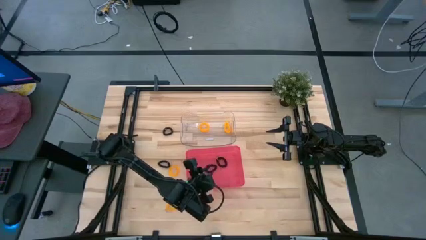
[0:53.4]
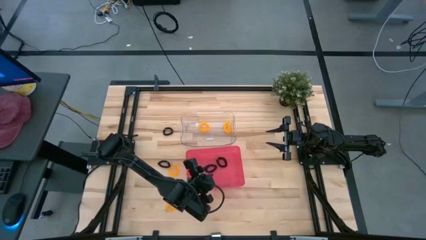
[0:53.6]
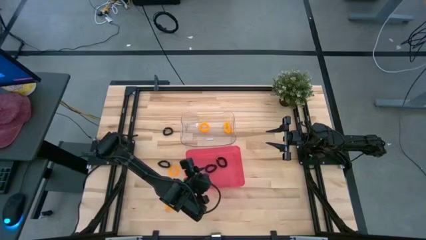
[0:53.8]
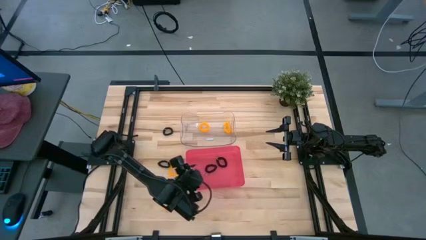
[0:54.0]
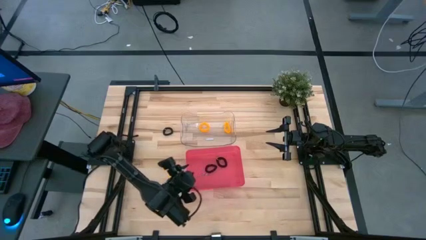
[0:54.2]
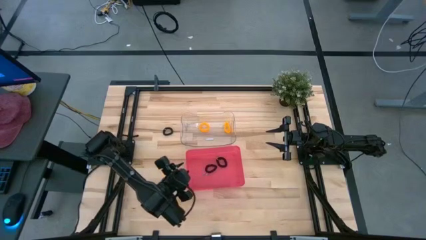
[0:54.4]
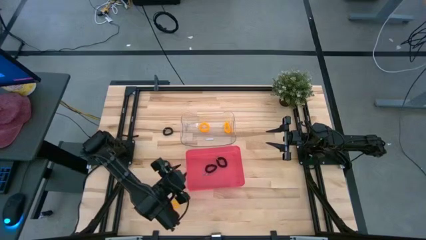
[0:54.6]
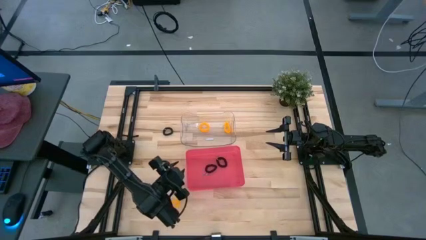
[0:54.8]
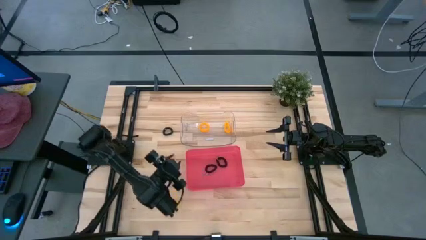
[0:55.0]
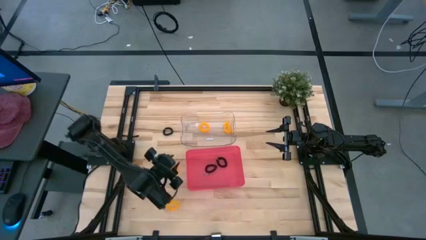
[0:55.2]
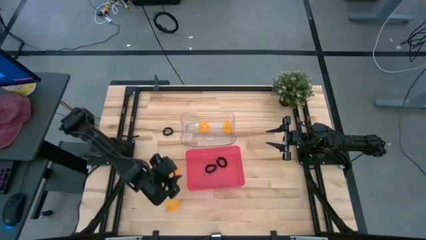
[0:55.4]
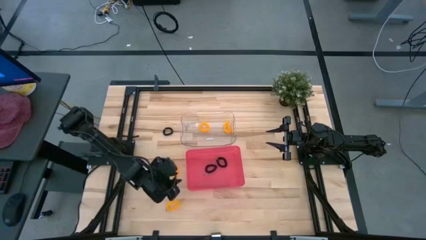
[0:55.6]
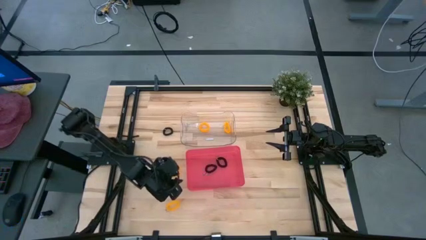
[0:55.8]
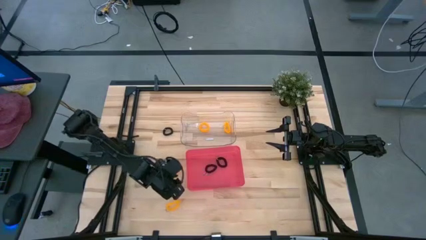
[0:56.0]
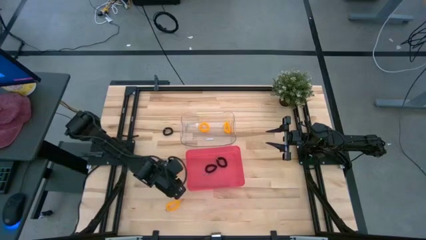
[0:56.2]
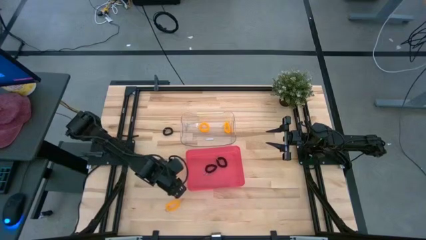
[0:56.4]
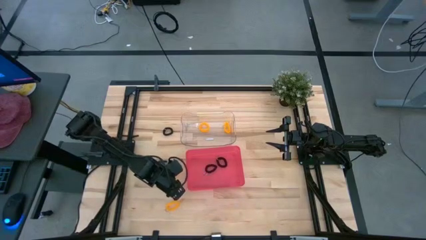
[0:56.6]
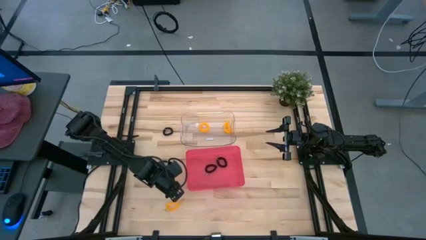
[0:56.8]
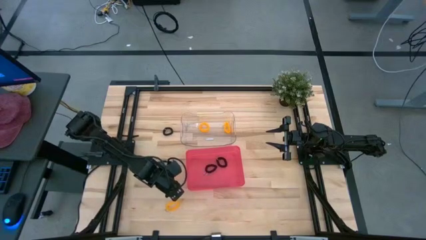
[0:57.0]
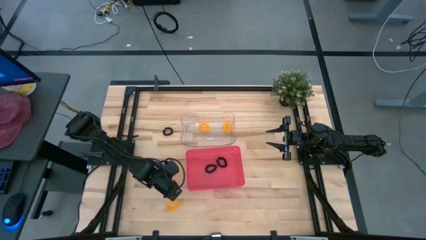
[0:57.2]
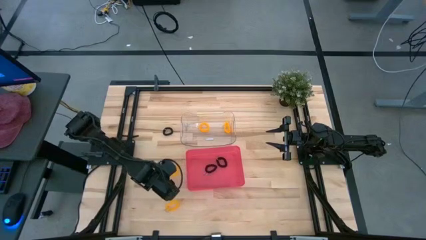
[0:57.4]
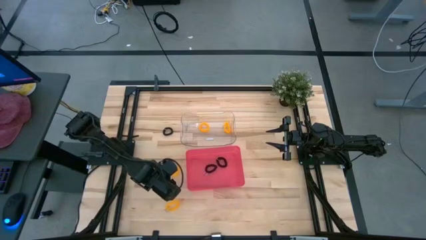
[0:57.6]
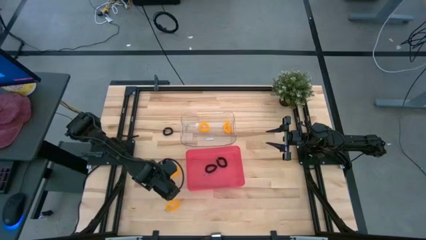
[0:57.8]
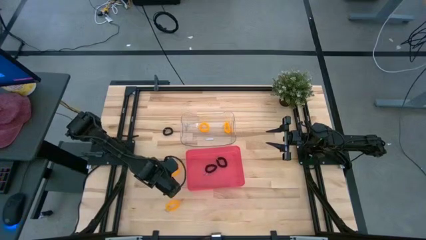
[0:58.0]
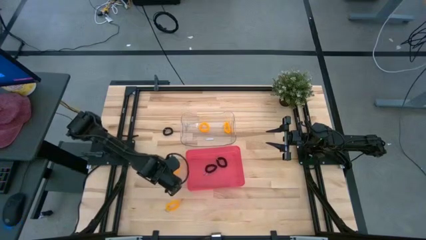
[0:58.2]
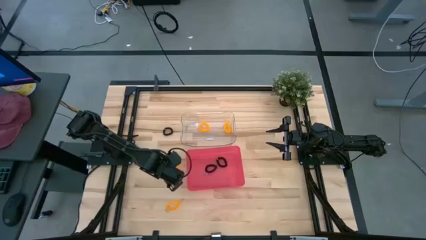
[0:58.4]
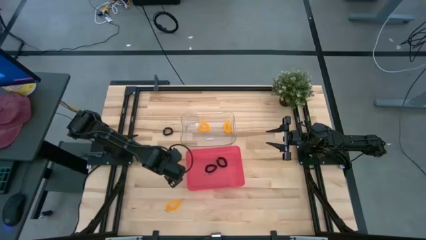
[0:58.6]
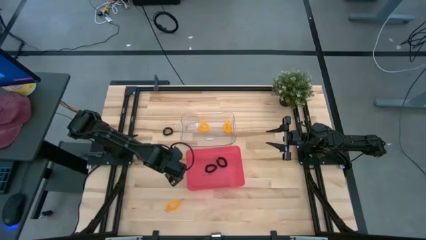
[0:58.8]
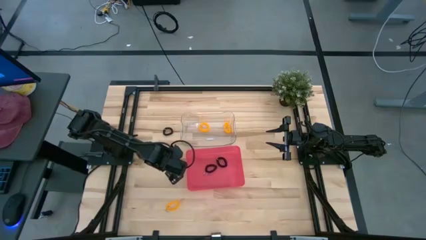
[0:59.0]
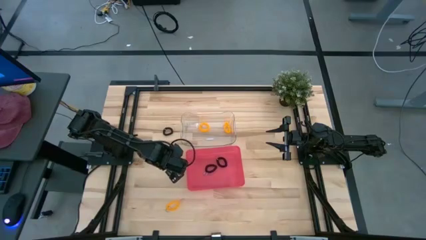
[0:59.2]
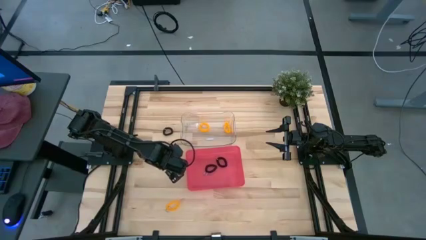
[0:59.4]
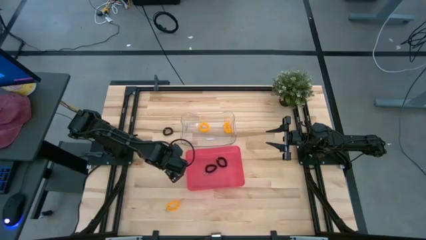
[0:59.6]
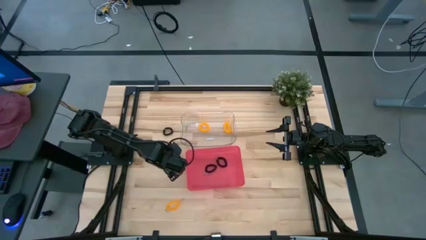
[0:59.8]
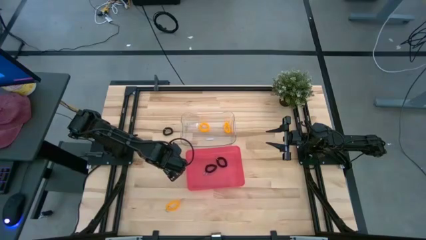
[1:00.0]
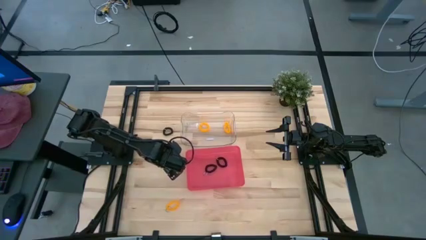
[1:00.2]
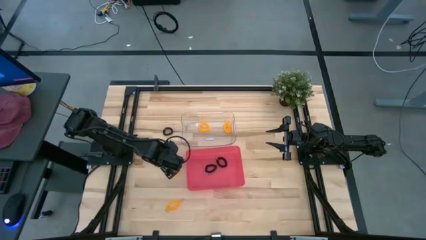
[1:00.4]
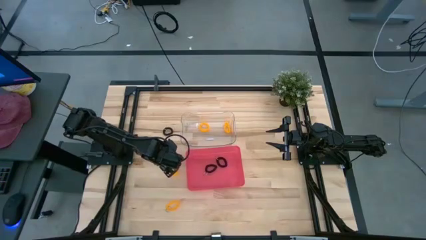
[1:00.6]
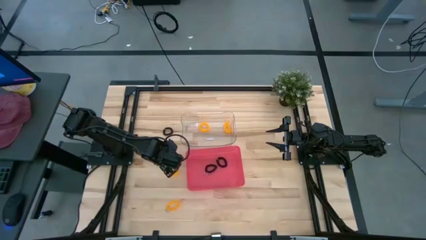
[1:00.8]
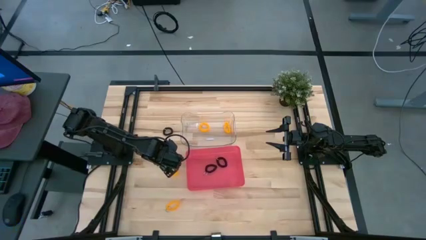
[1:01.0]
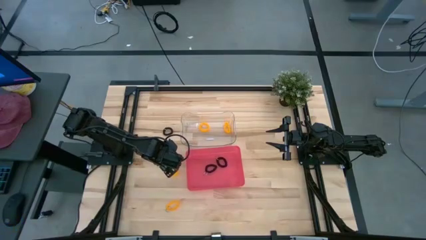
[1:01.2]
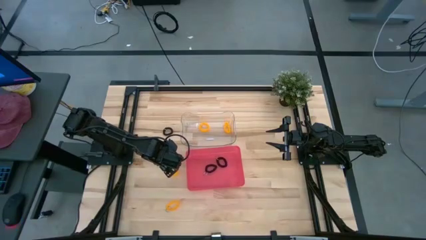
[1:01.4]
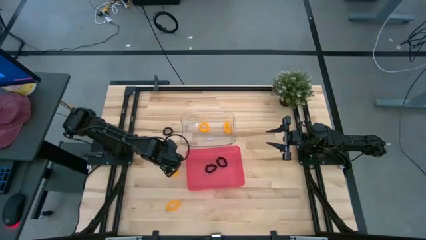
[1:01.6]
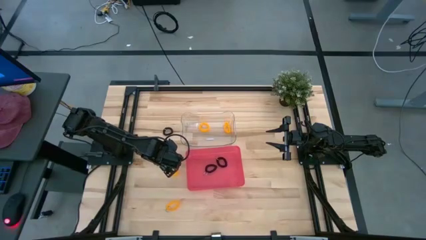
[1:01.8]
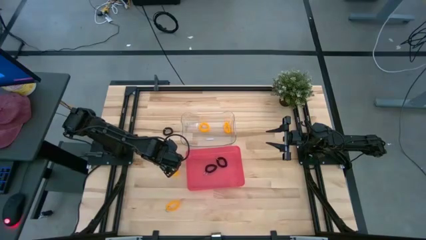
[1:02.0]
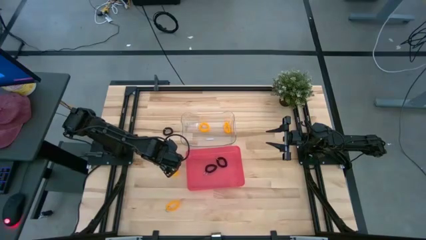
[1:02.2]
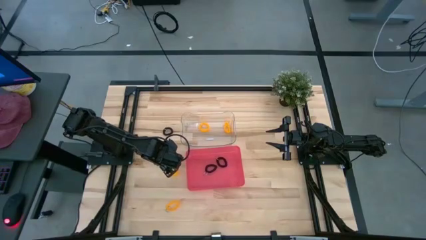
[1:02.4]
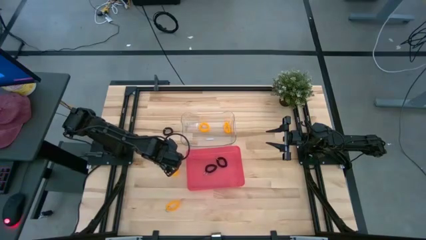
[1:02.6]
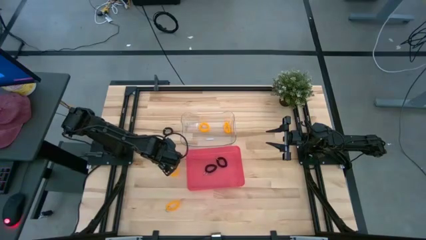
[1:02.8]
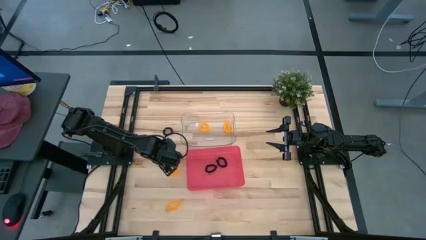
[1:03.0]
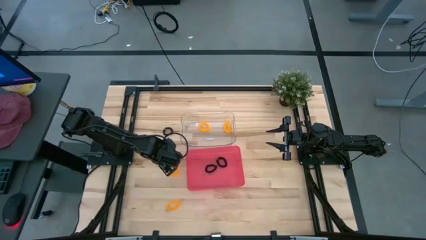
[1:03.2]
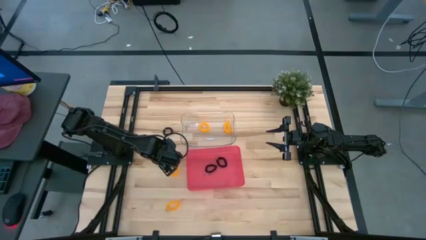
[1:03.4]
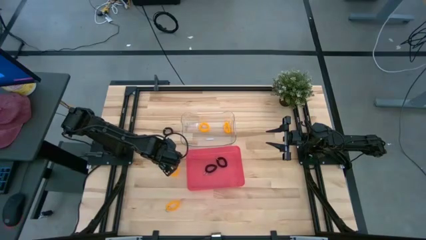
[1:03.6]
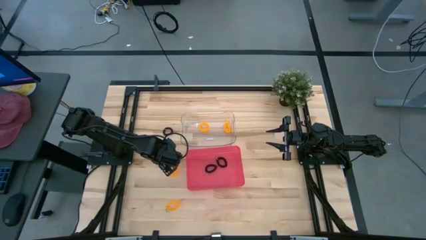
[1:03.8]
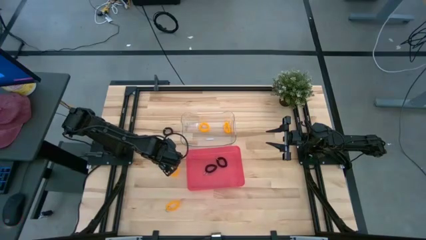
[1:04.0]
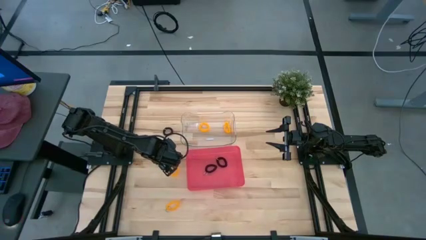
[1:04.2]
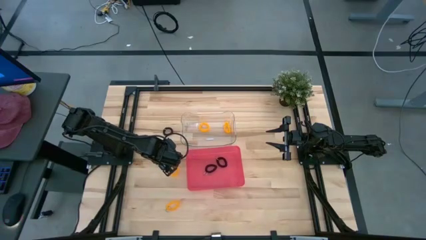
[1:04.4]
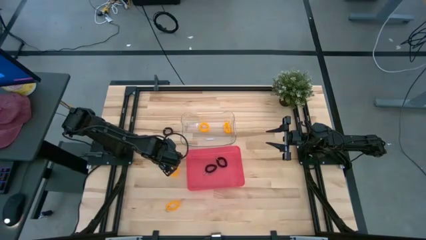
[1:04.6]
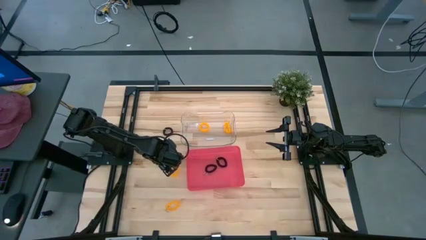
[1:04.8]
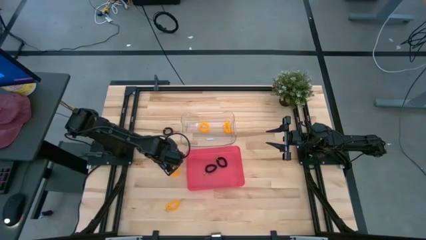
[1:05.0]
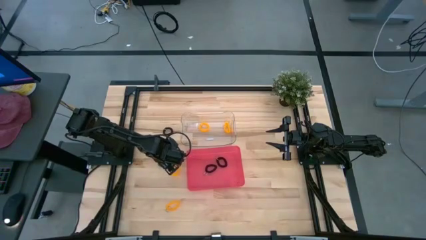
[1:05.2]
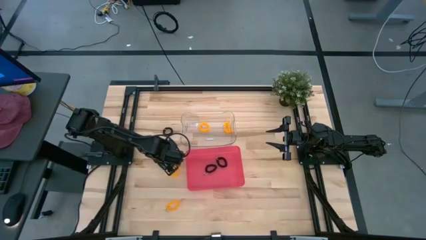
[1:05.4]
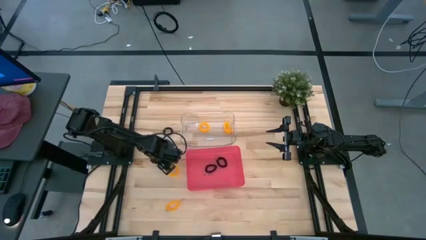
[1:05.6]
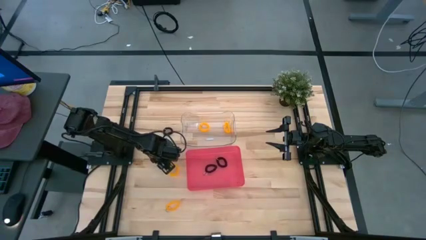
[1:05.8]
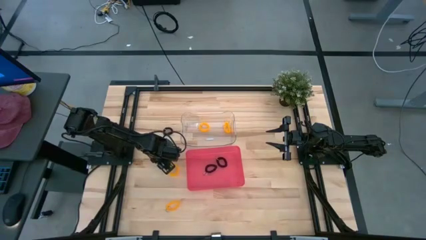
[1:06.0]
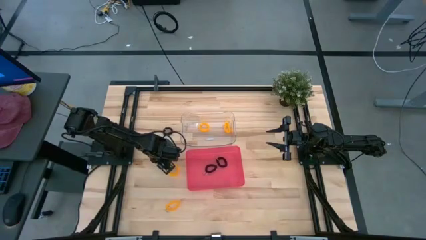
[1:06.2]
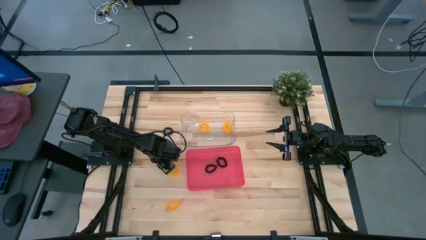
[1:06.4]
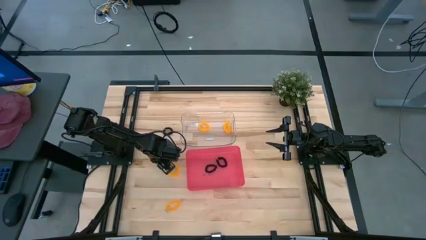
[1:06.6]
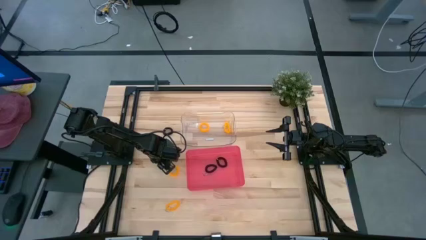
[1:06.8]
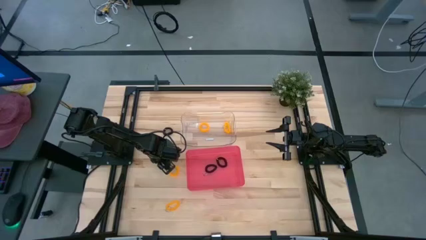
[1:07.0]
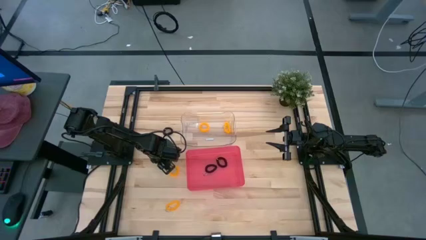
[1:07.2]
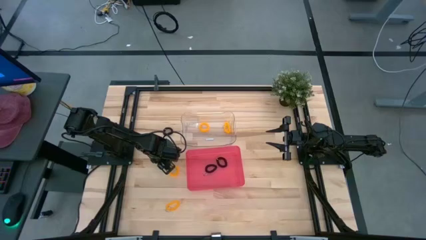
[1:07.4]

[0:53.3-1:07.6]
Task: Sort spring keychains
Put the black spring keychain into the red bin

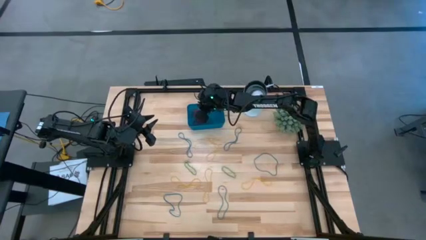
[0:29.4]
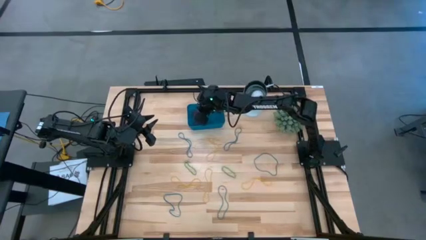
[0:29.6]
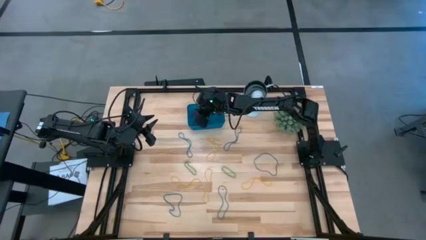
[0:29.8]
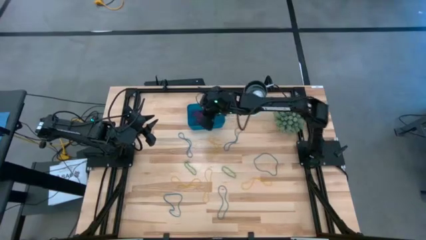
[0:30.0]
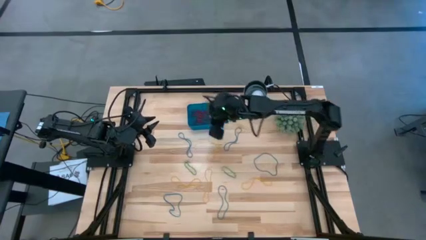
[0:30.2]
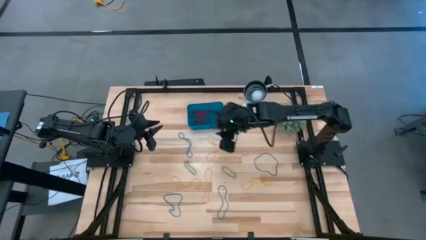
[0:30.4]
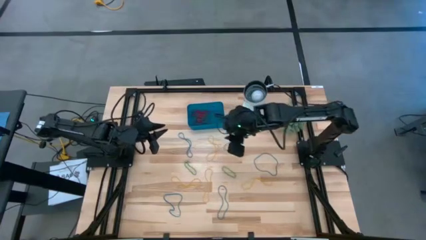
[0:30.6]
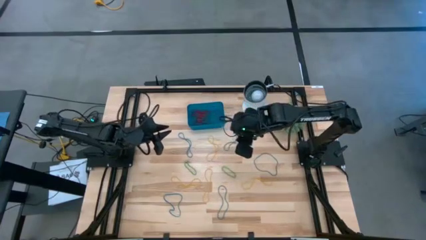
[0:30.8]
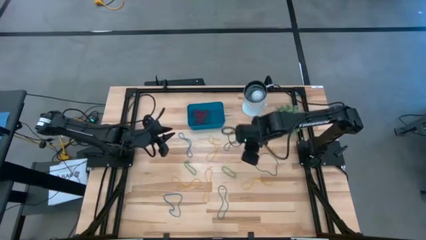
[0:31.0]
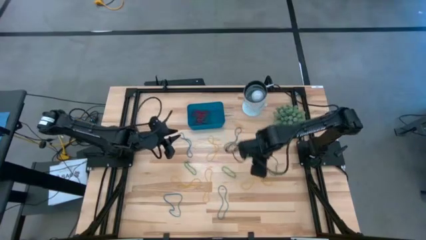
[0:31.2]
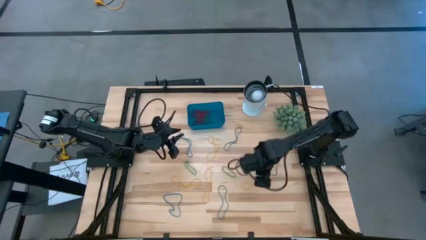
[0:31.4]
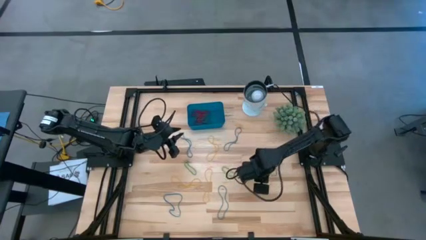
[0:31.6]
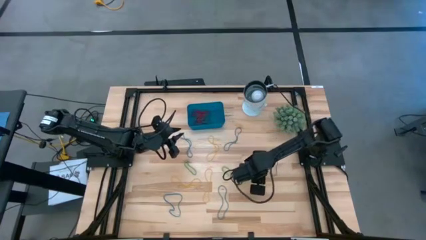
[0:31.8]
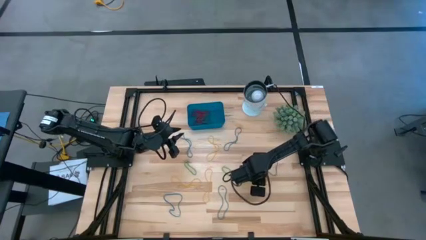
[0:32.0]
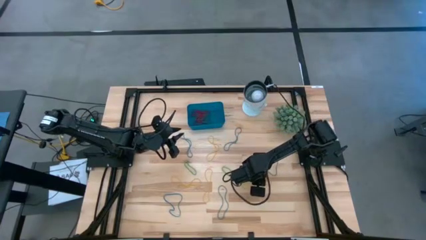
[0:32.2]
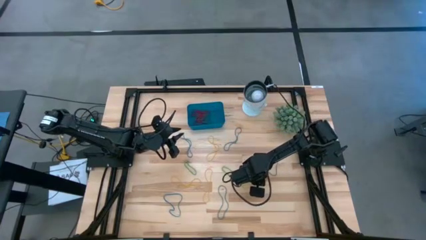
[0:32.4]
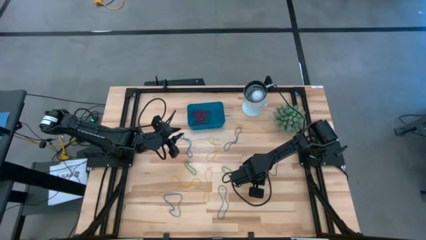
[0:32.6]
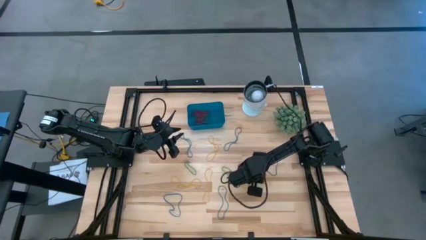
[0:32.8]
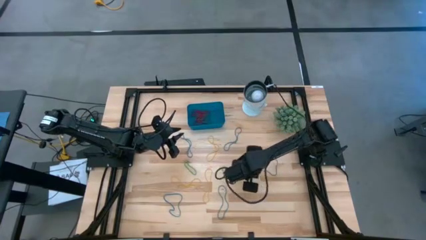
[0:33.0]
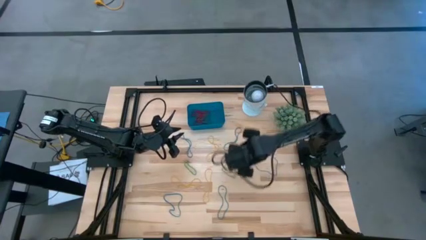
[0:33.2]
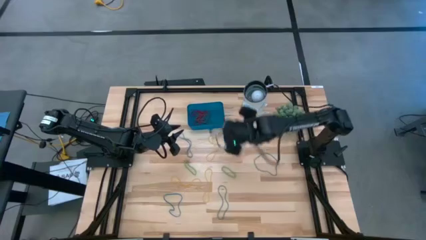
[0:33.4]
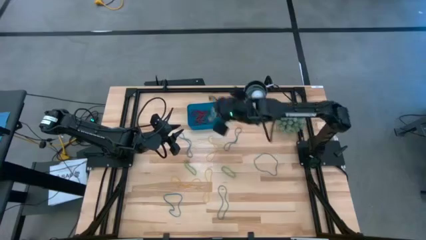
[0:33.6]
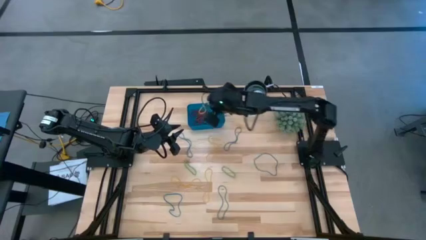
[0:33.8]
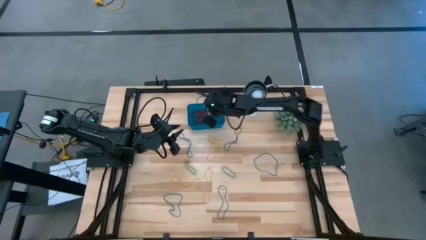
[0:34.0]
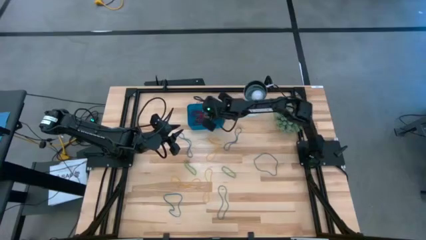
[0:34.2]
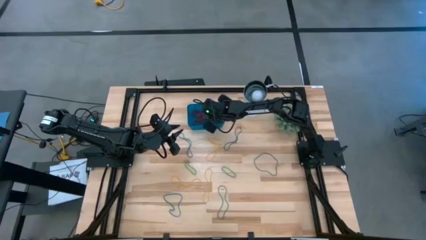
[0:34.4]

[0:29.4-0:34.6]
Task: Pick and place items into bin
Put the yellow rubber band into the blue bin
